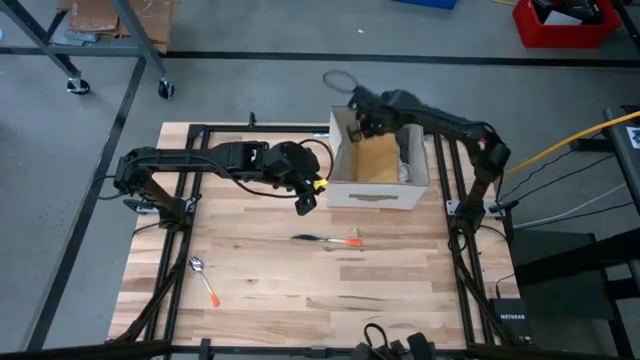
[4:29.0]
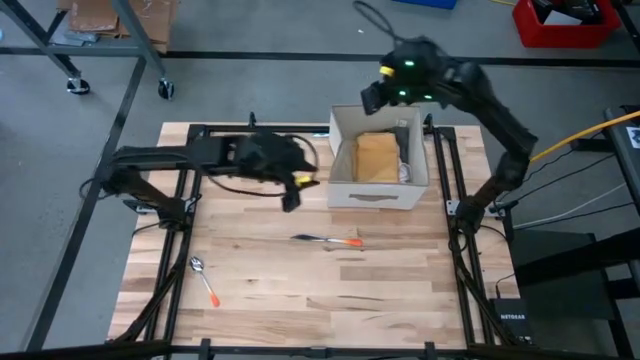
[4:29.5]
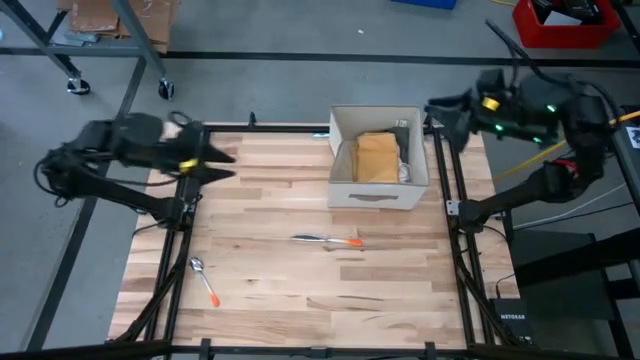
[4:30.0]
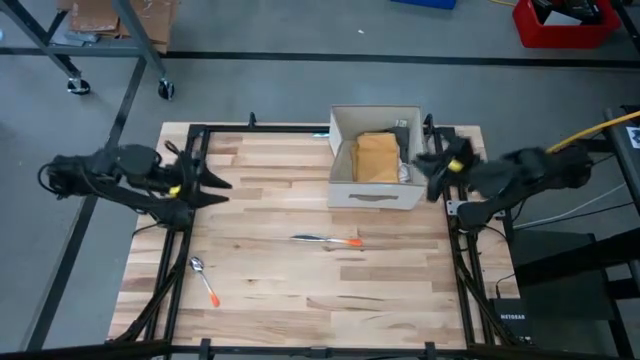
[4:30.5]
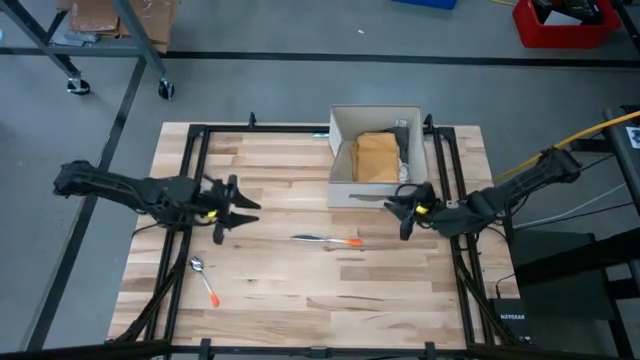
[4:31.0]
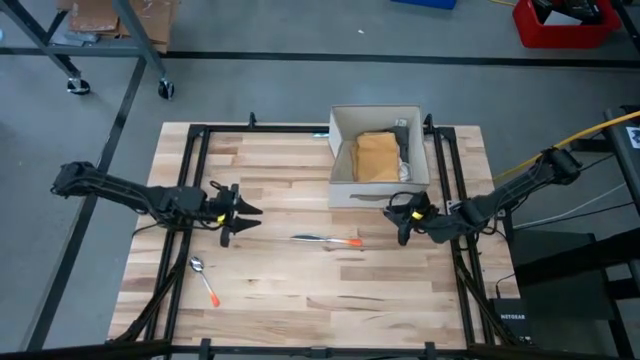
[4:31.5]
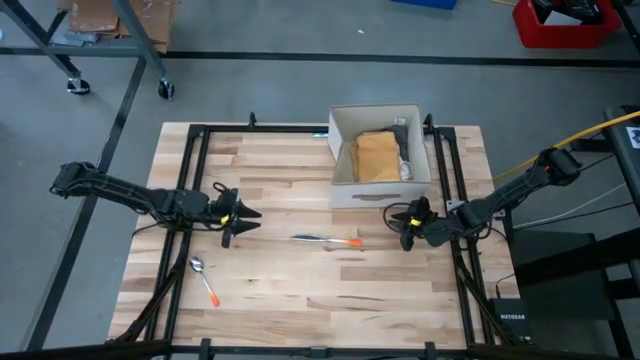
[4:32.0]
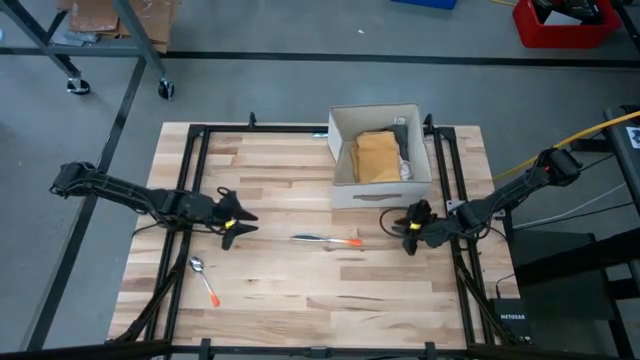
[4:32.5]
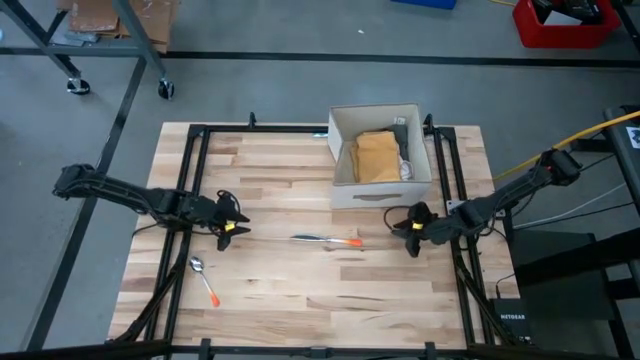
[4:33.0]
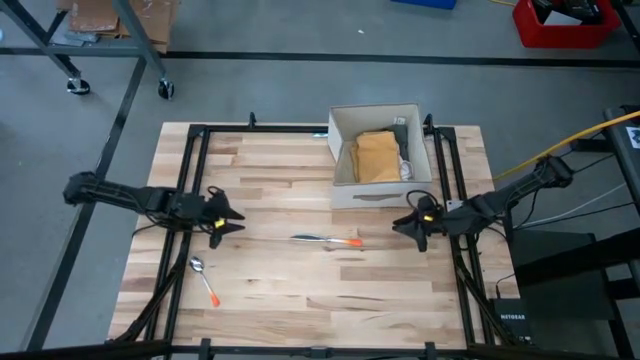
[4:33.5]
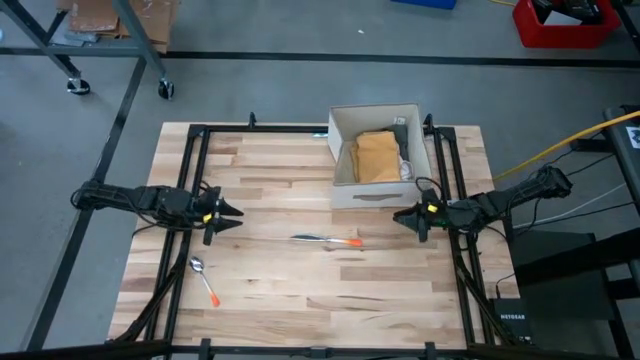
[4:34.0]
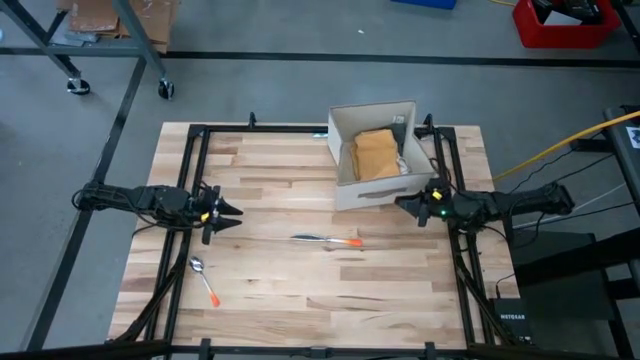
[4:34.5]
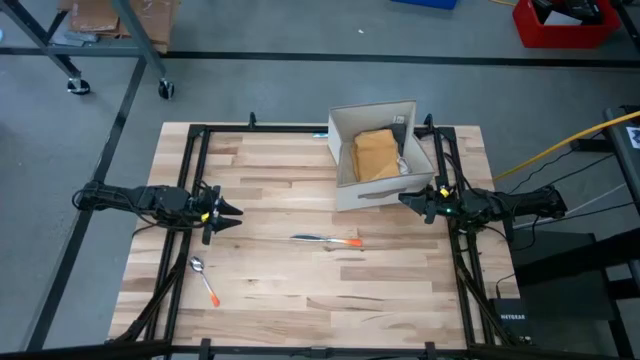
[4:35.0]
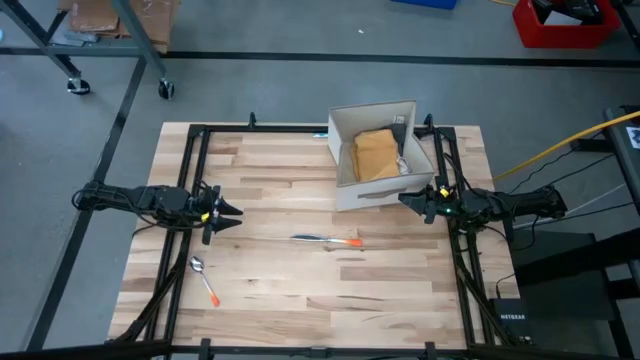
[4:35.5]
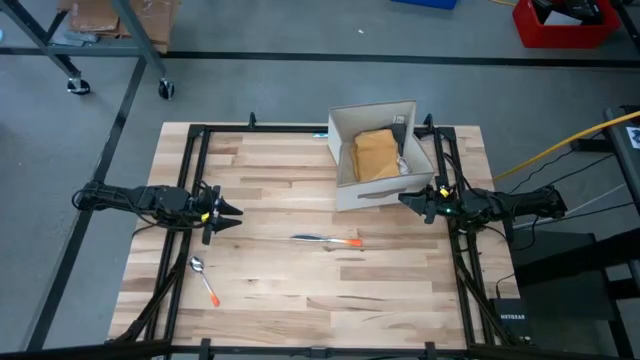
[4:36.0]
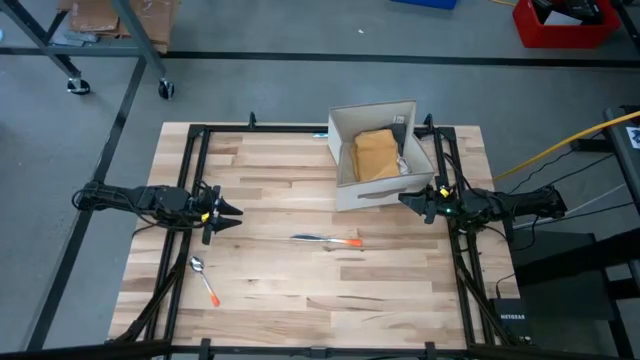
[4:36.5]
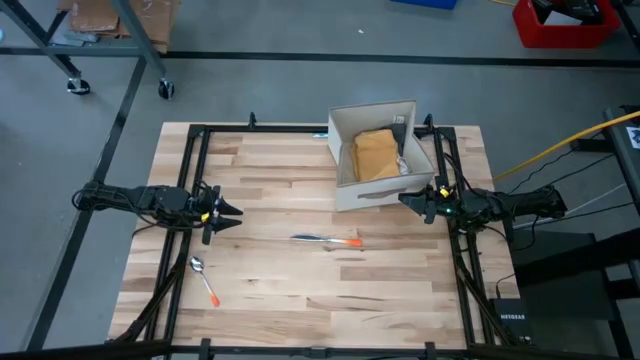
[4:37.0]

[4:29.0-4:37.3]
Task: Fold towel
Return to Home Position

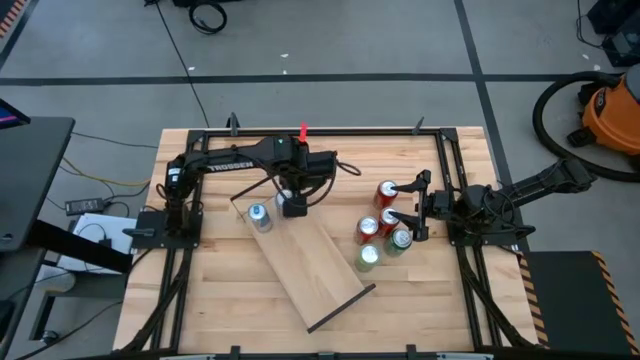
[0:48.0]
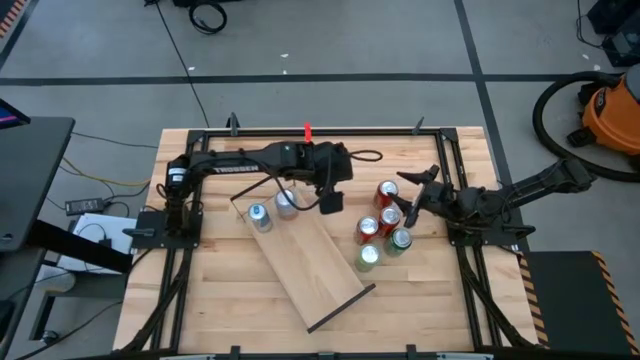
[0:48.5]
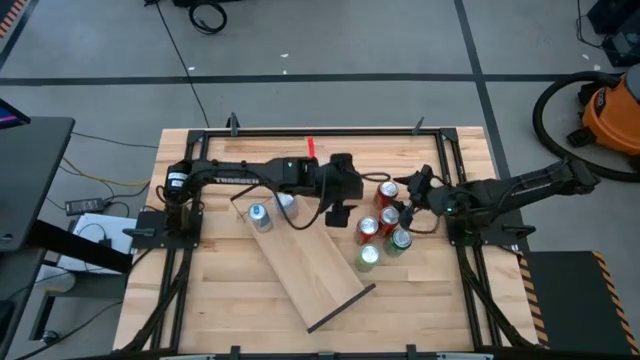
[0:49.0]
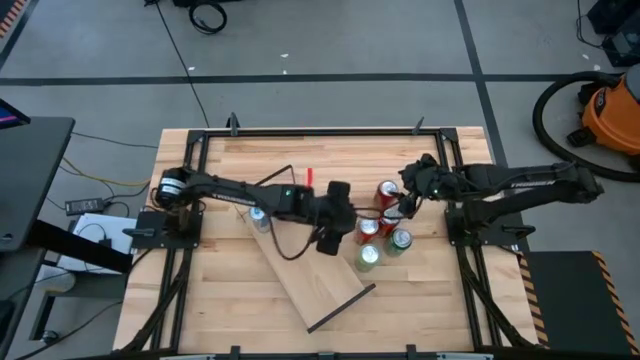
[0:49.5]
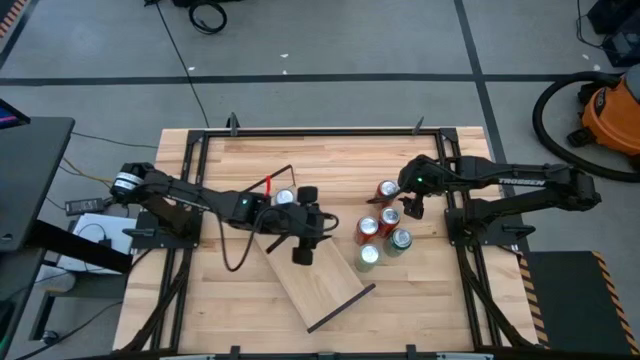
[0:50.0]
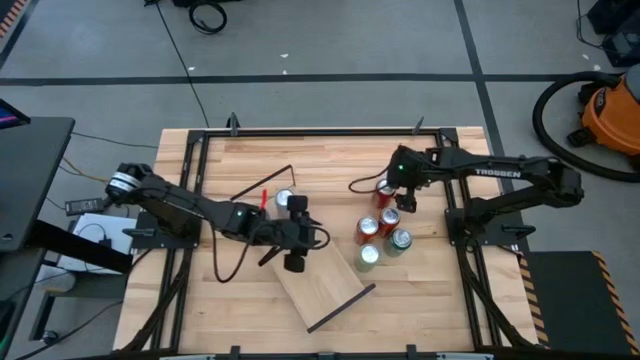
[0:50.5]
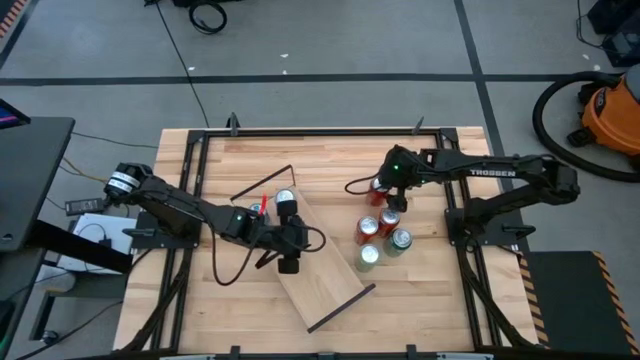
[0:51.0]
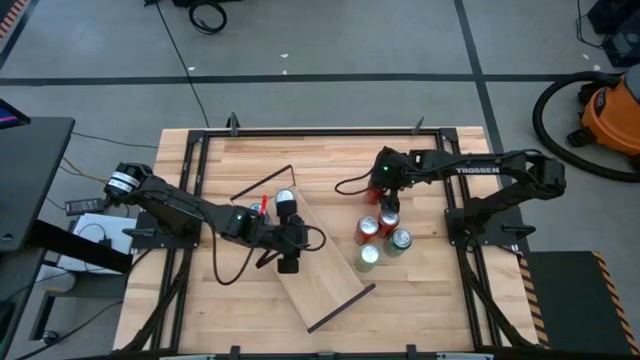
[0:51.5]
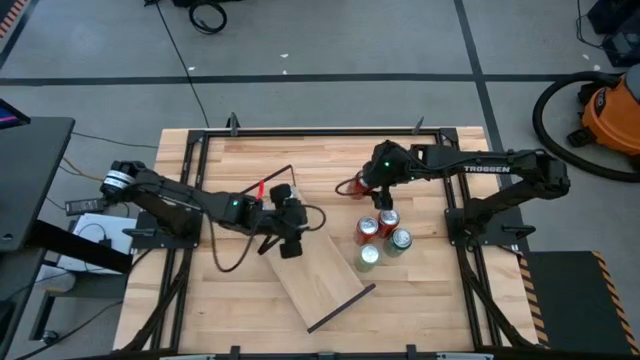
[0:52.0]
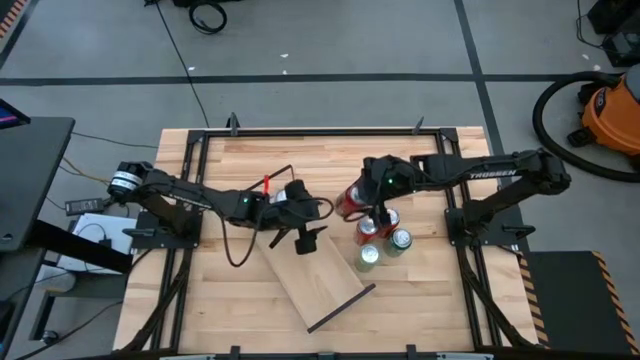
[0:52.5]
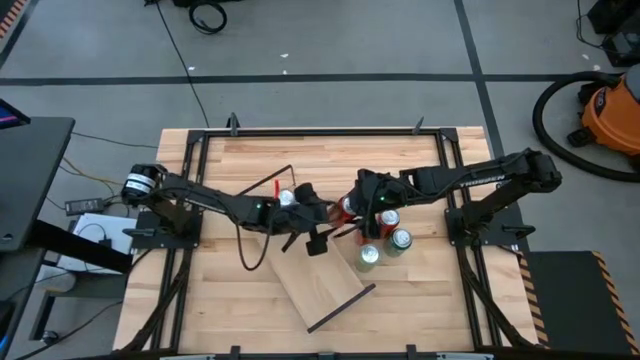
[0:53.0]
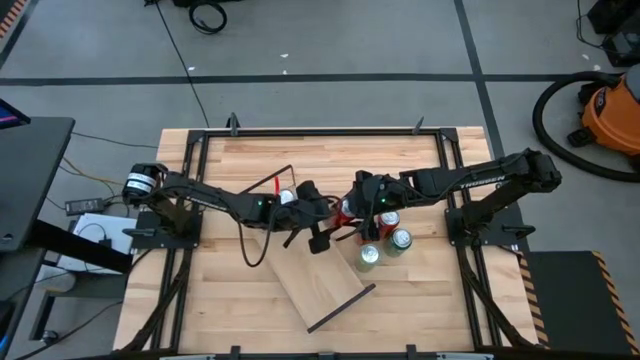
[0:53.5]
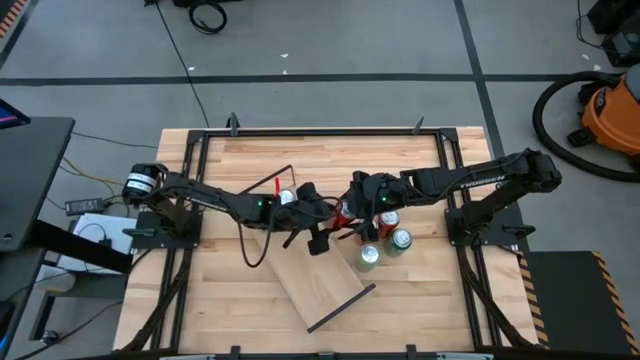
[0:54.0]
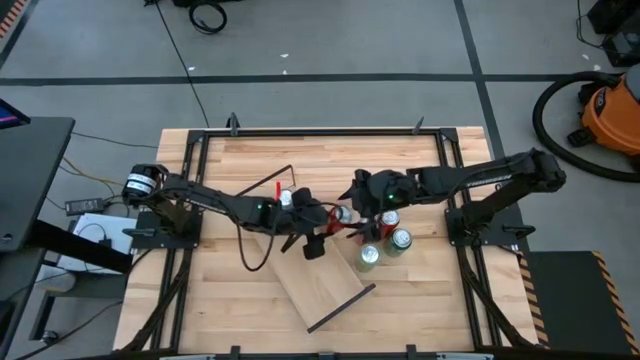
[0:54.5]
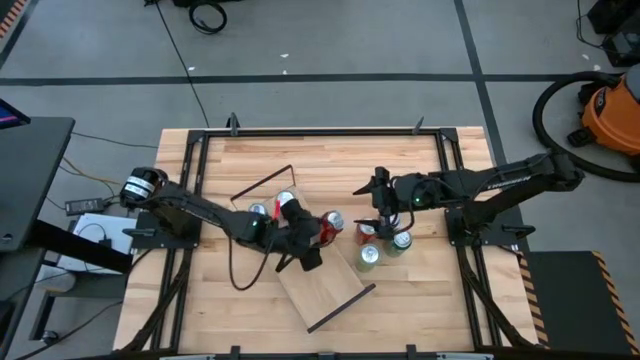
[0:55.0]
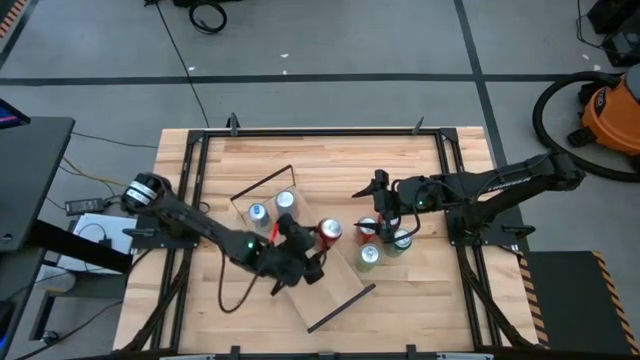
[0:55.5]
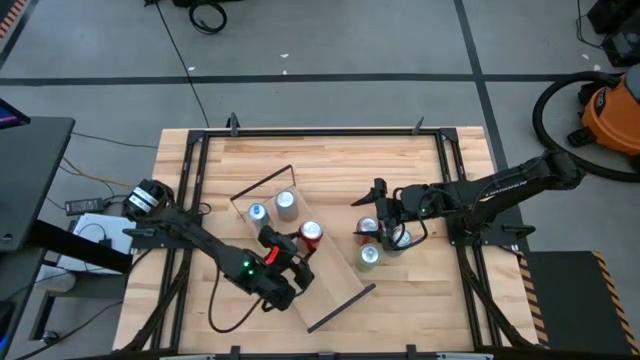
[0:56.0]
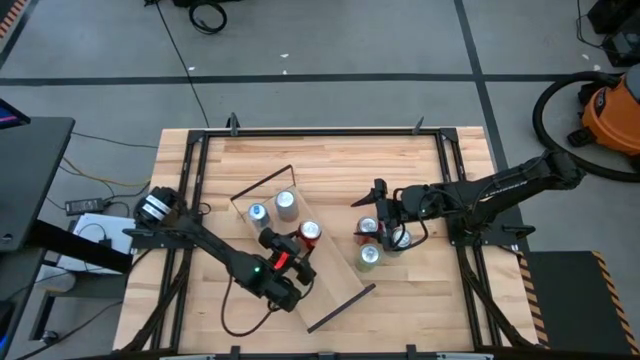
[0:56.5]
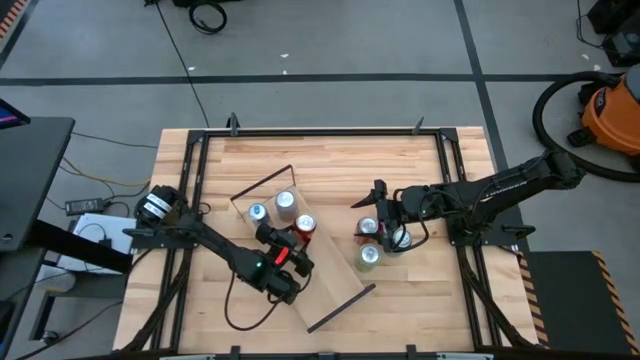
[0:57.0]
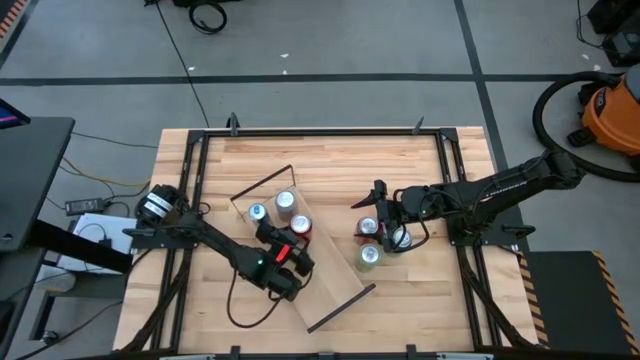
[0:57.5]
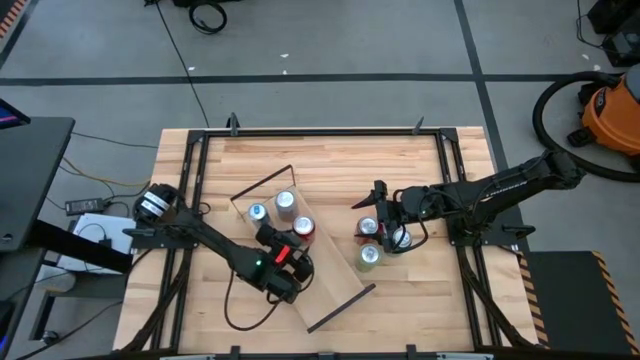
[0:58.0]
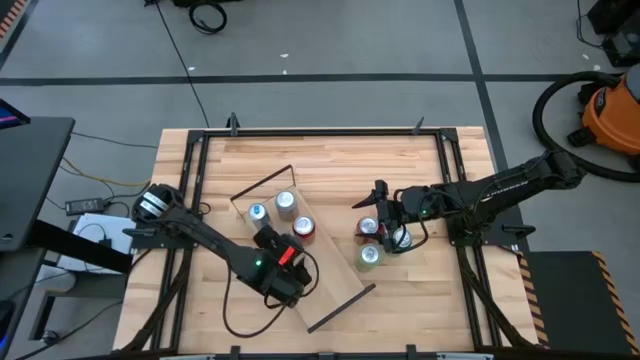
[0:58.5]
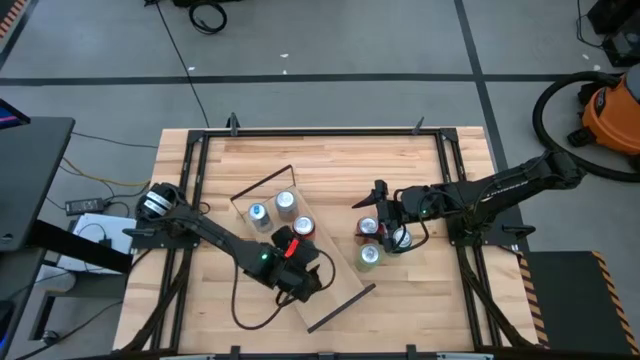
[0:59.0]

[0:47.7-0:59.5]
Task: Place canned beverage on shelf
Put the red black soda can on the shelf
